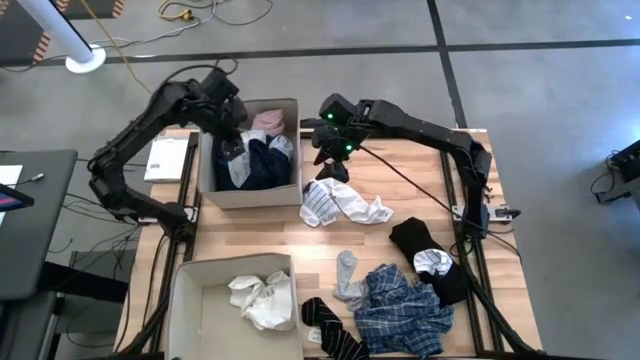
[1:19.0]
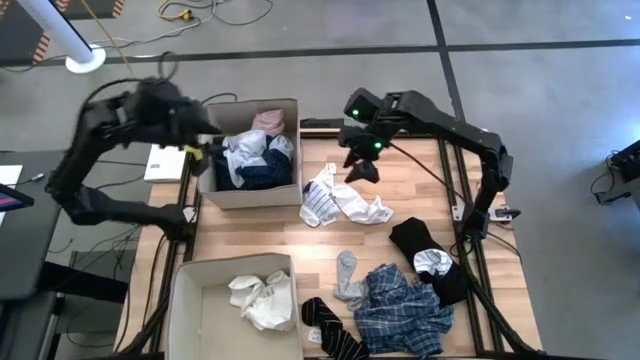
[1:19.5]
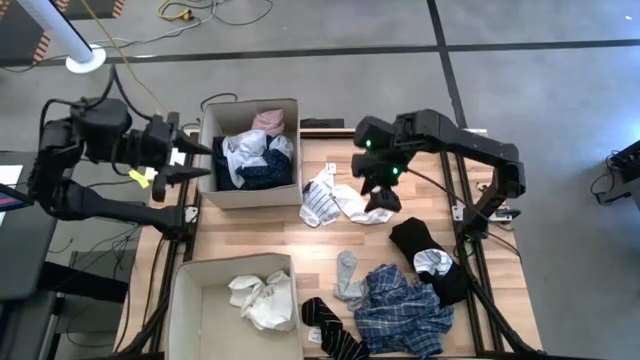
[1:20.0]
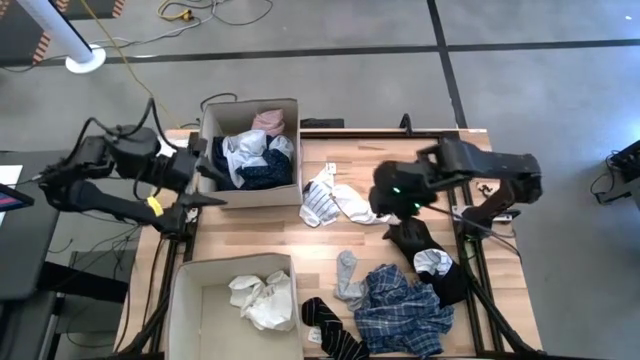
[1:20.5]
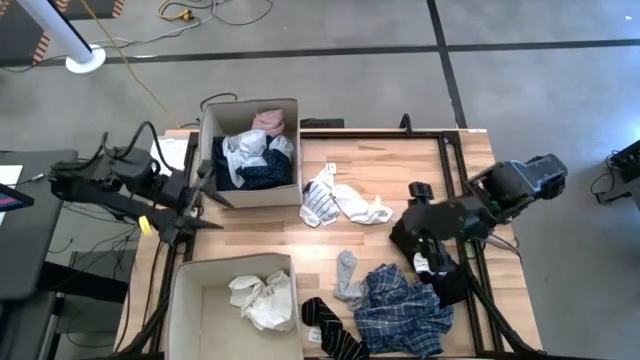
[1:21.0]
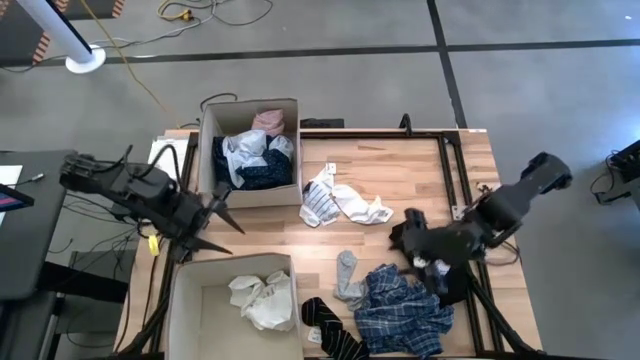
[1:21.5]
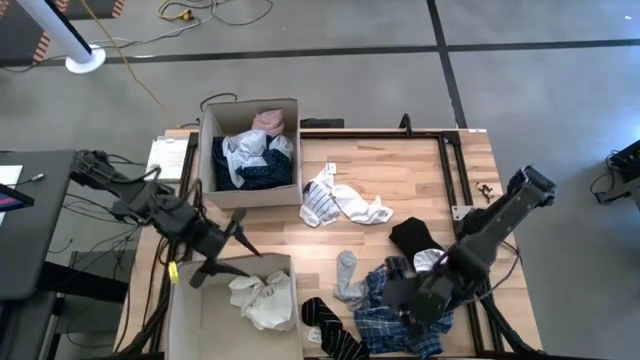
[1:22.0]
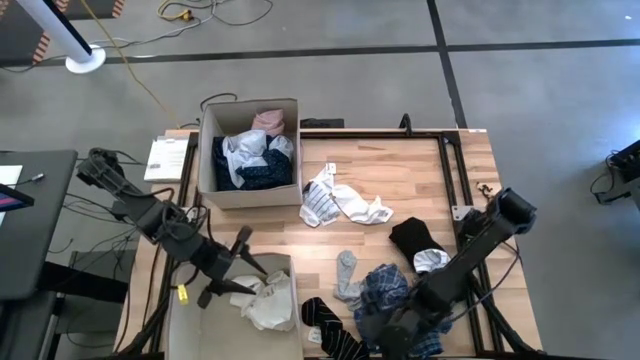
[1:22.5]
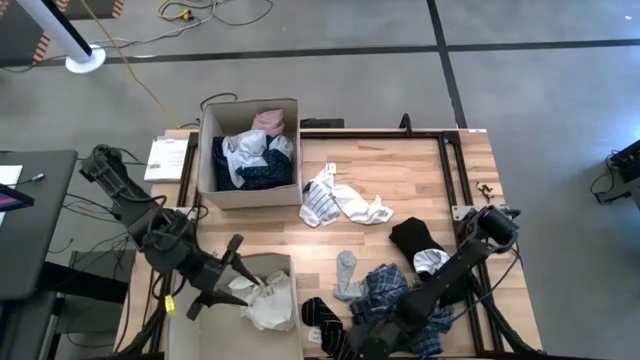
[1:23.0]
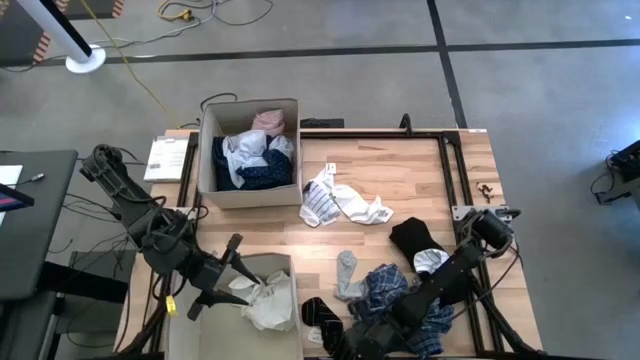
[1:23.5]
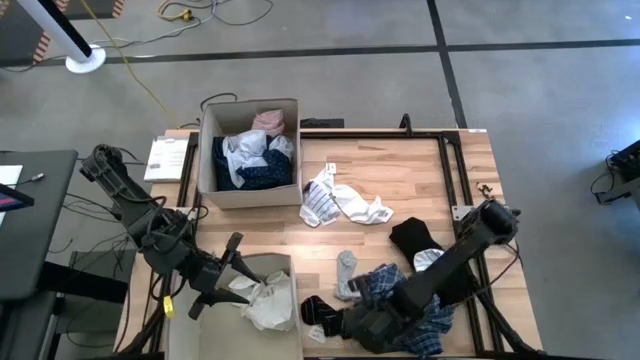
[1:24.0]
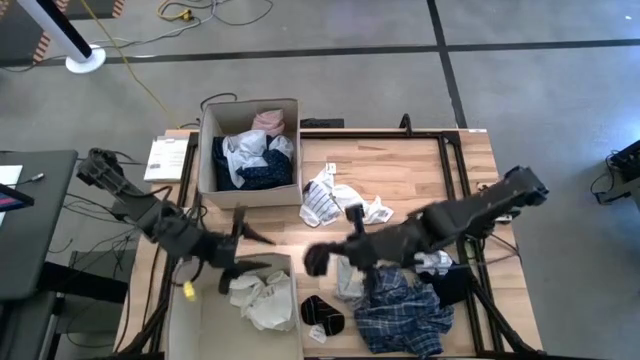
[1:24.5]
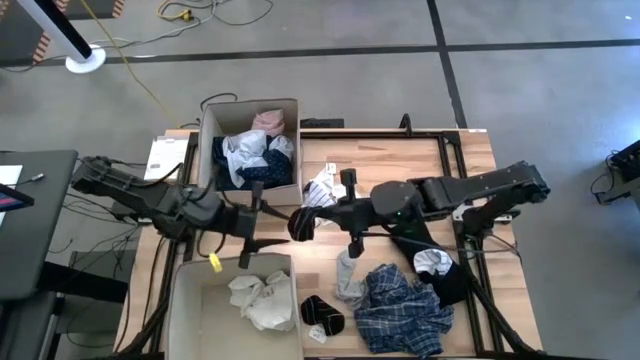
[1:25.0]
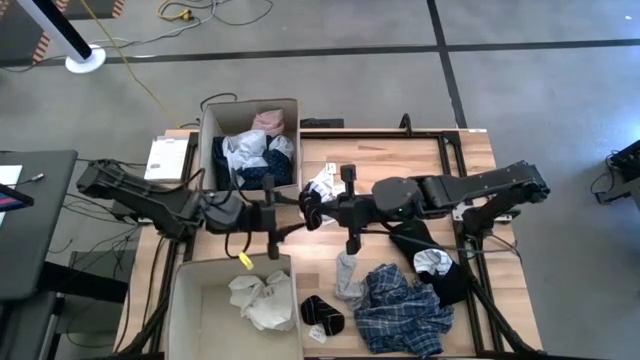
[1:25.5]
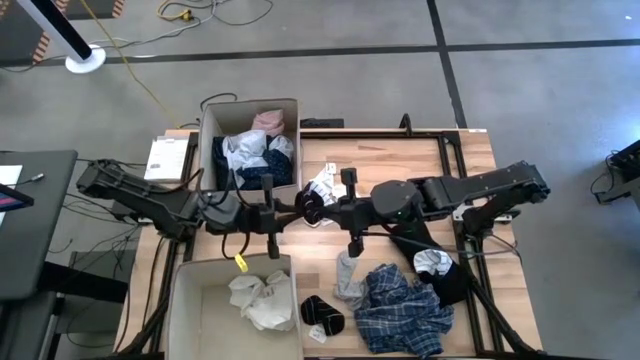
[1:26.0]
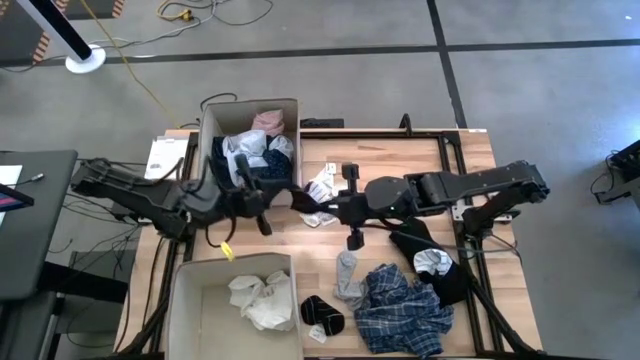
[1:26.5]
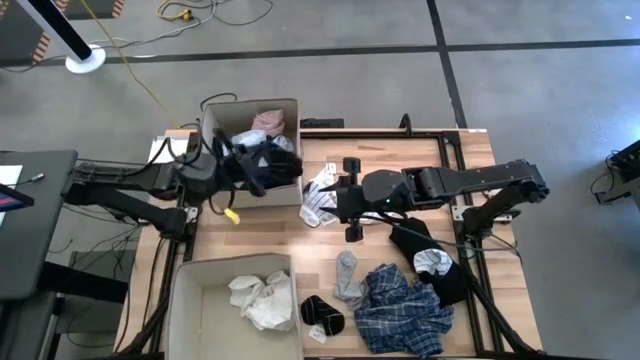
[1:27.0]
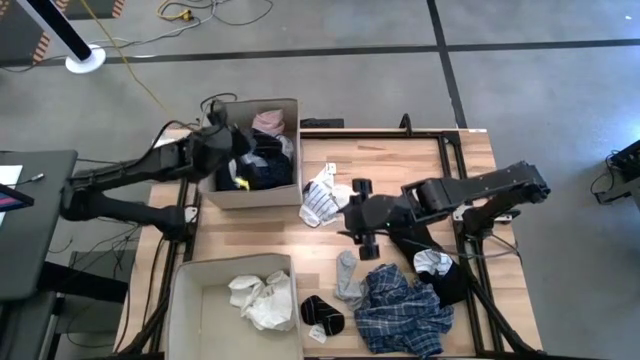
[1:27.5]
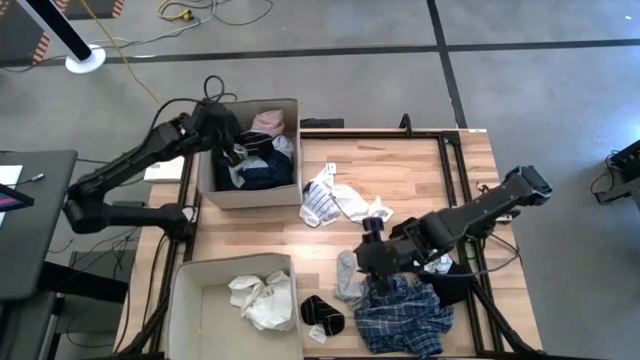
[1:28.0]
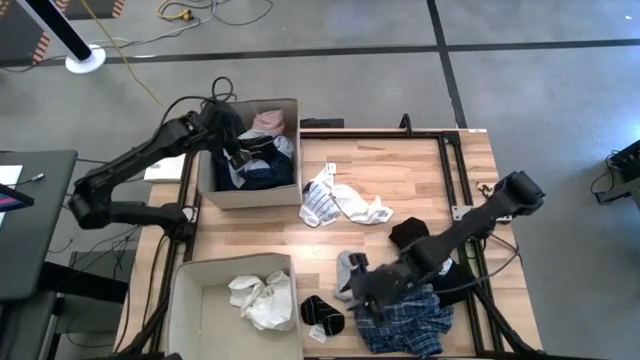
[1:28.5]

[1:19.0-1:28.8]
Task: Sort clothes
Put the bottom black sock into the top light brown laundry organizer

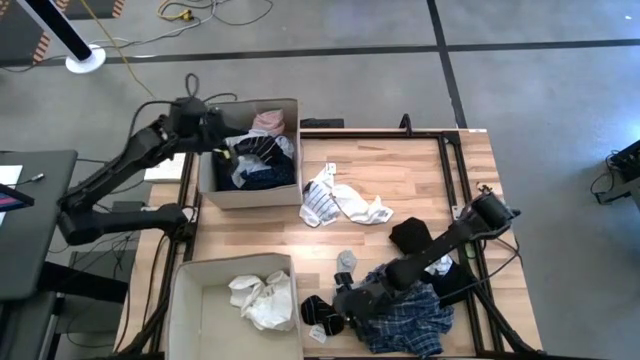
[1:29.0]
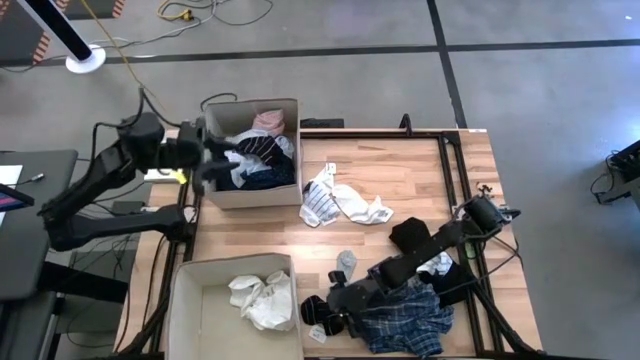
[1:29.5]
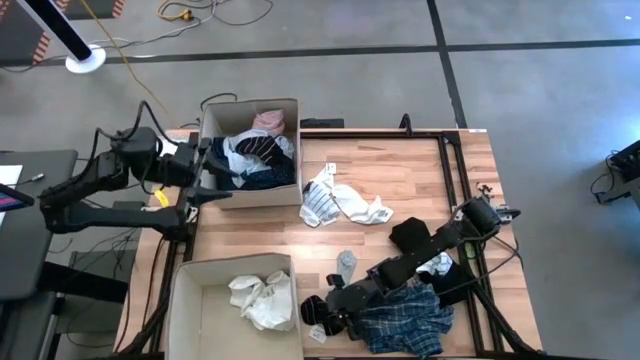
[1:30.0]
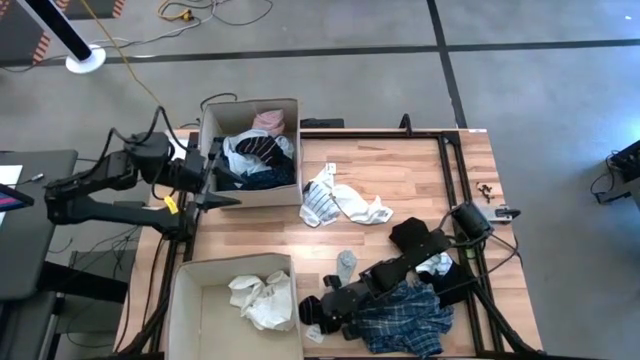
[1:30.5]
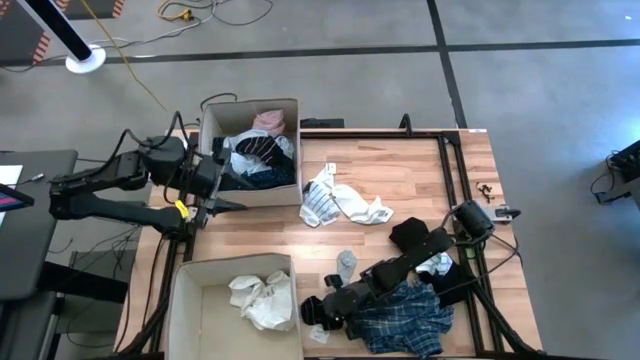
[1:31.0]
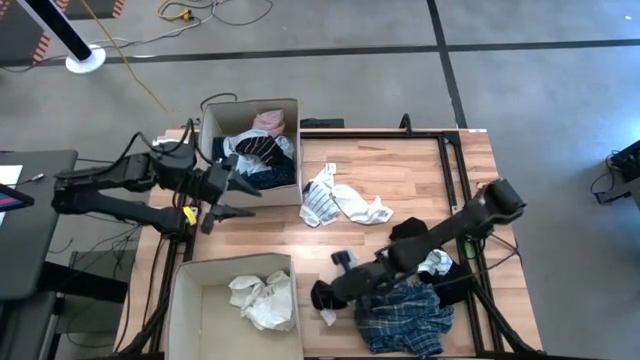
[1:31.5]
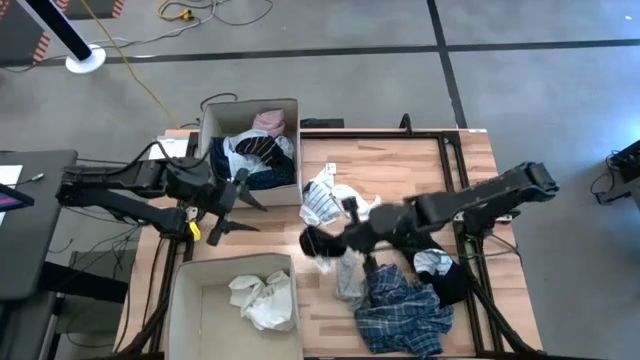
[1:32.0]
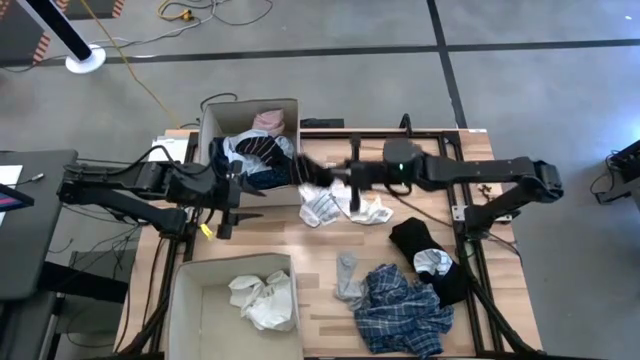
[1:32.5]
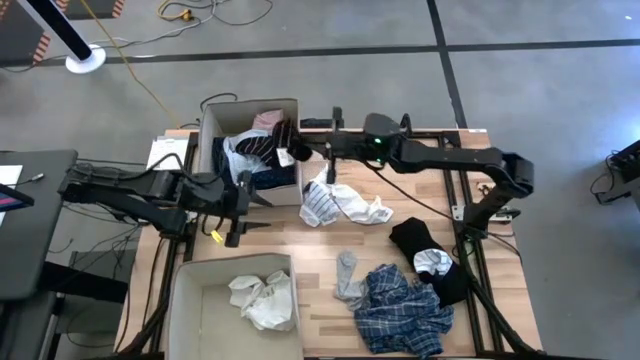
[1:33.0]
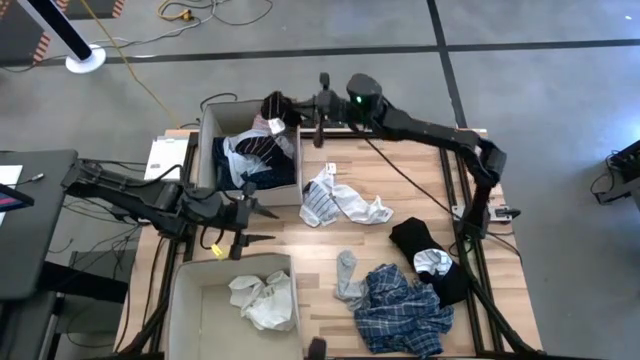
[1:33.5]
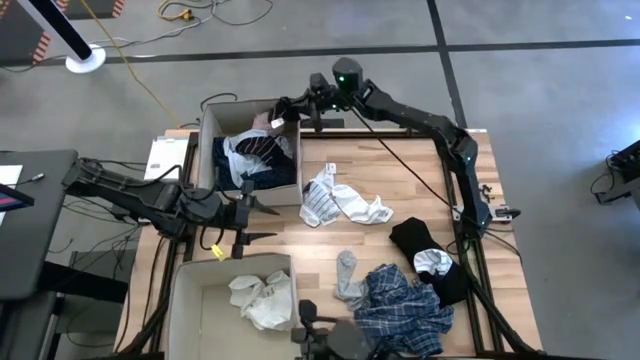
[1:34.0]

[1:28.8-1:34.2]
Put the black sock into the top light brown laundry organizer

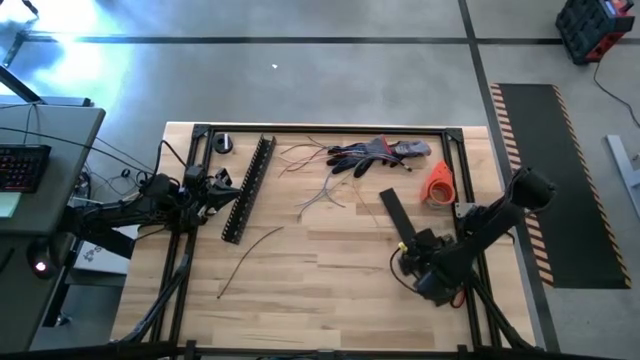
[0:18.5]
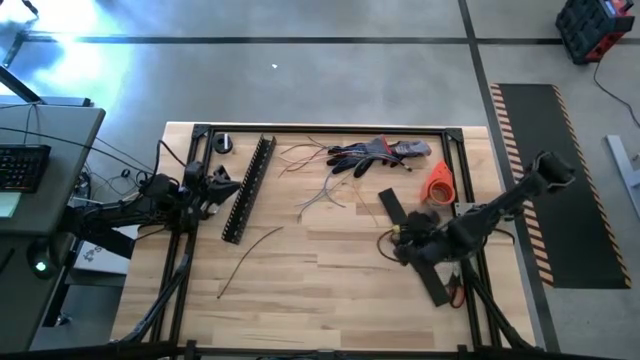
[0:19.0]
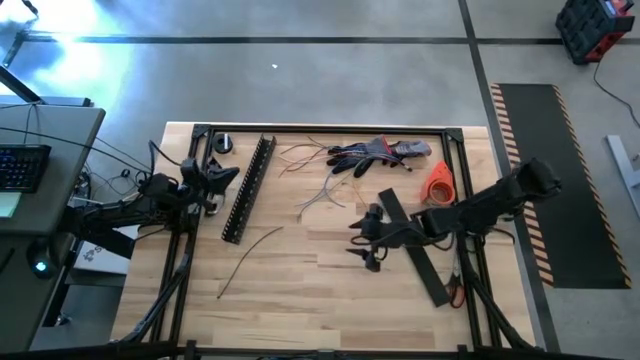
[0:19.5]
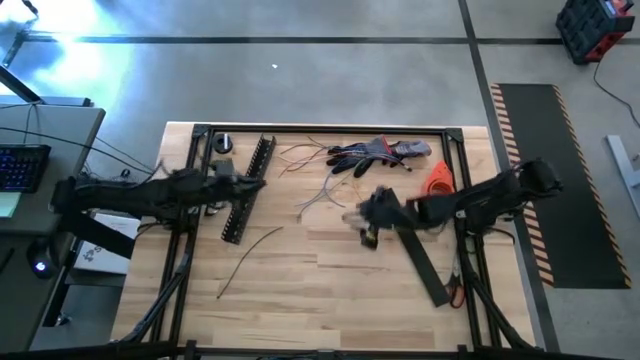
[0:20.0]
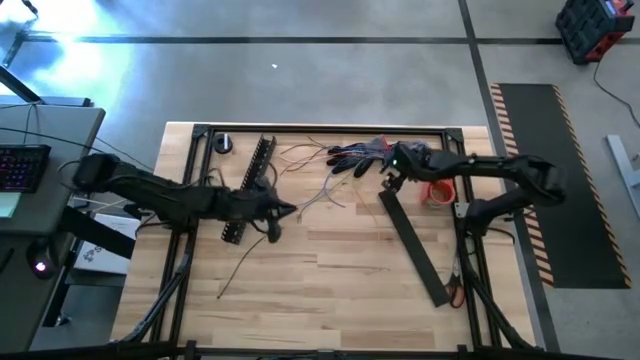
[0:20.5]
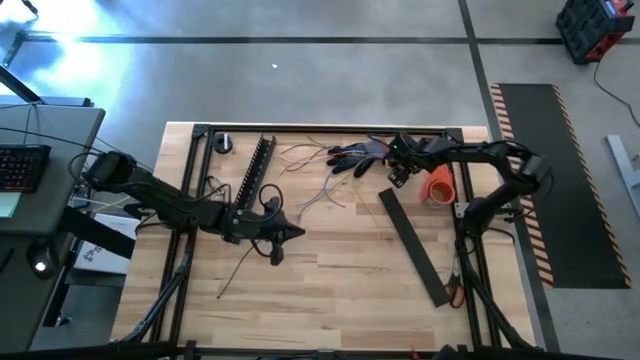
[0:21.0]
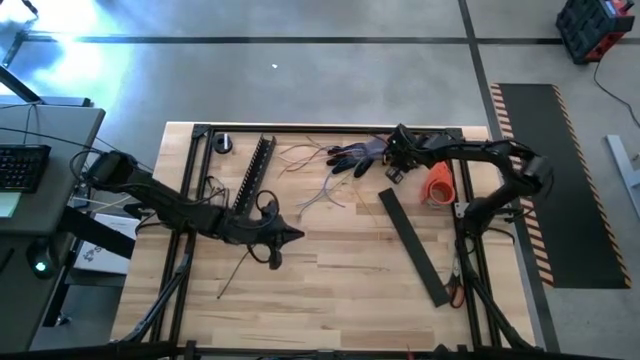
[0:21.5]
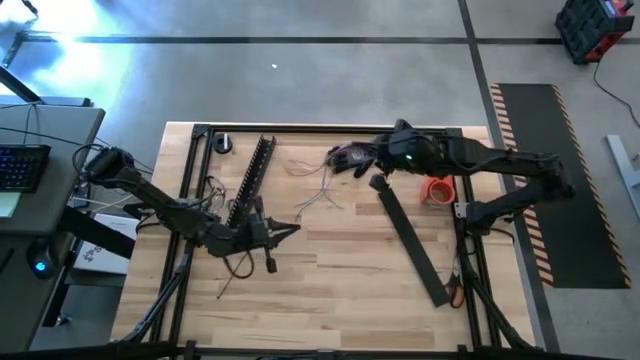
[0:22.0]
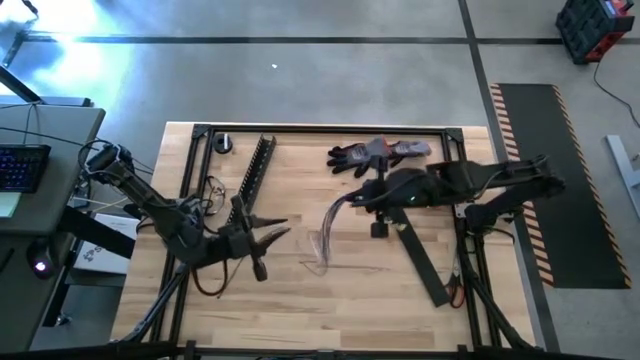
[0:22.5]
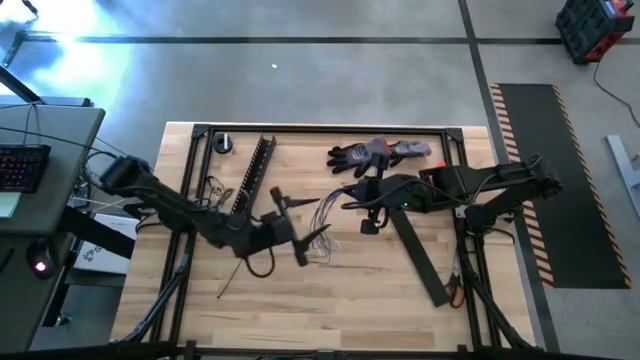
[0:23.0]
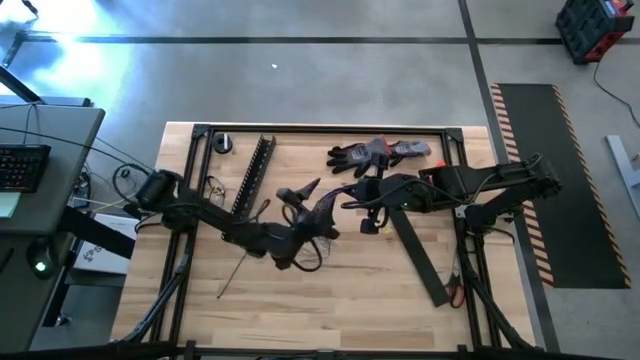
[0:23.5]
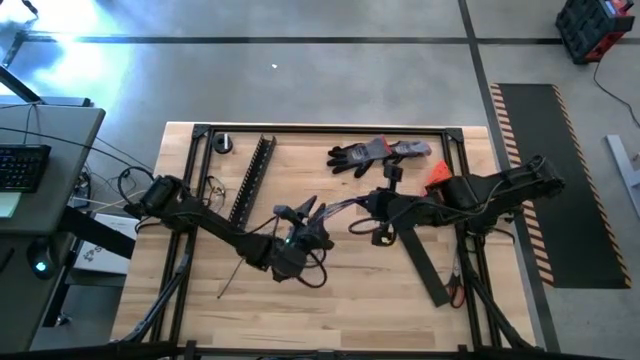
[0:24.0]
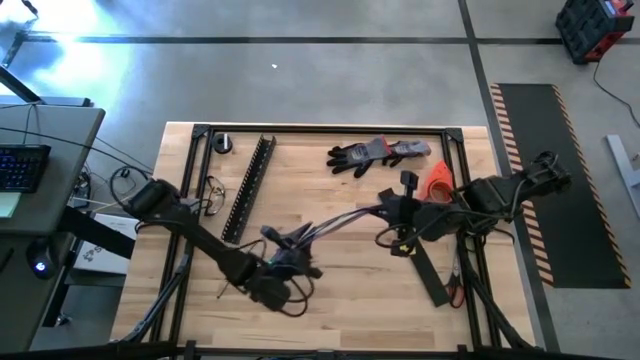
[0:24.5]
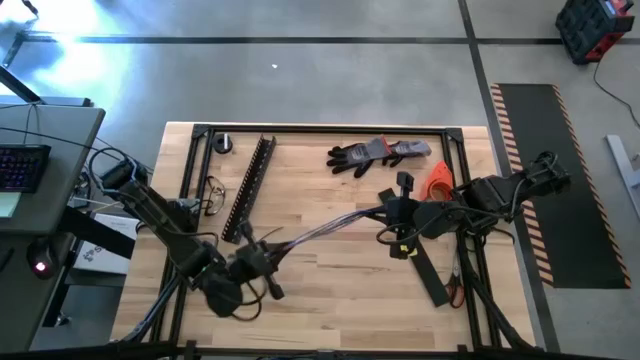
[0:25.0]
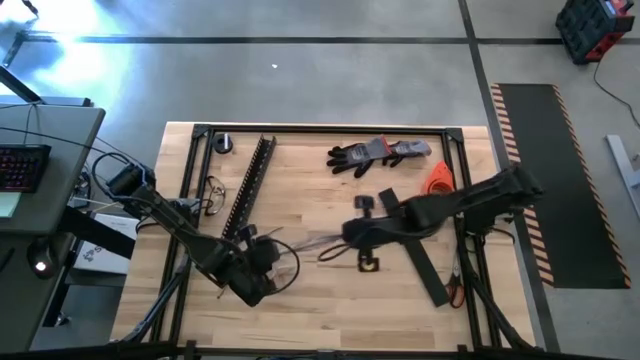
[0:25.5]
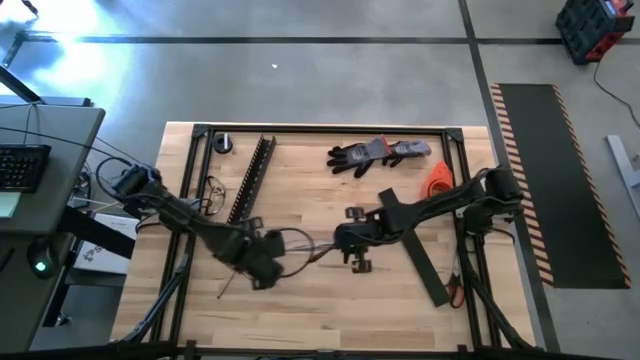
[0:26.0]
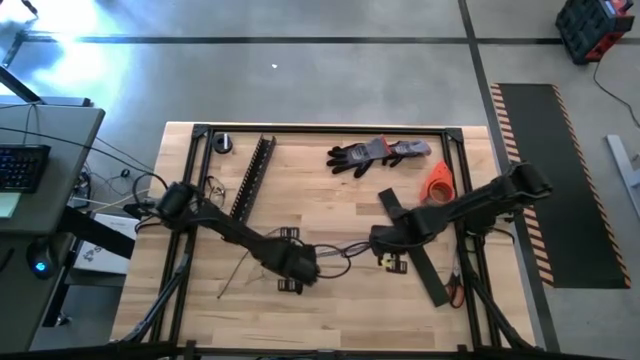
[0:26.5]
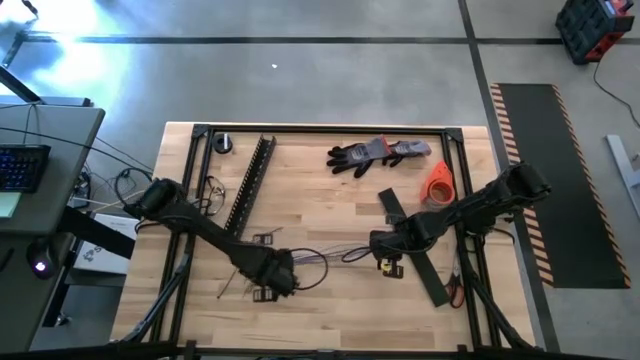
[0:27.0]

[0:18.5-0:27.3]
Task: Ziptie cables
Prepare the cable wires to the center of the table
